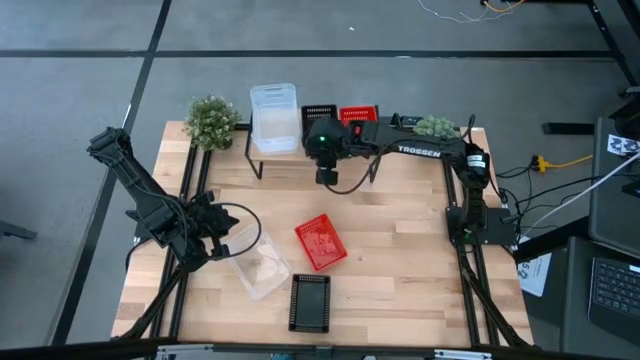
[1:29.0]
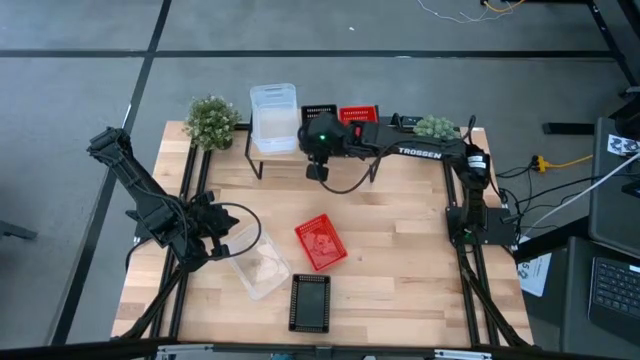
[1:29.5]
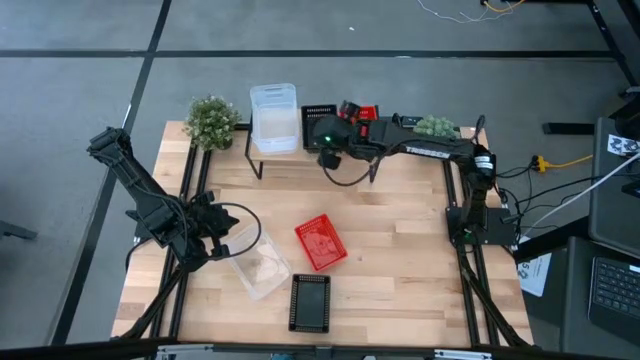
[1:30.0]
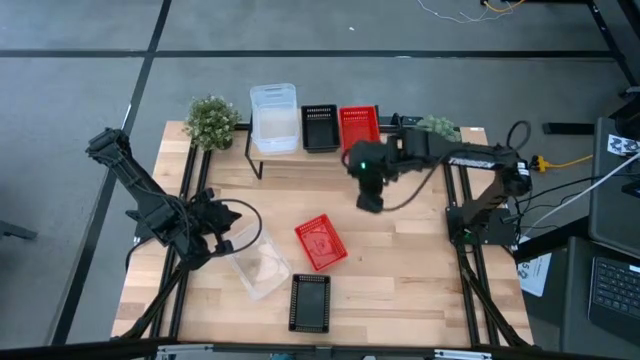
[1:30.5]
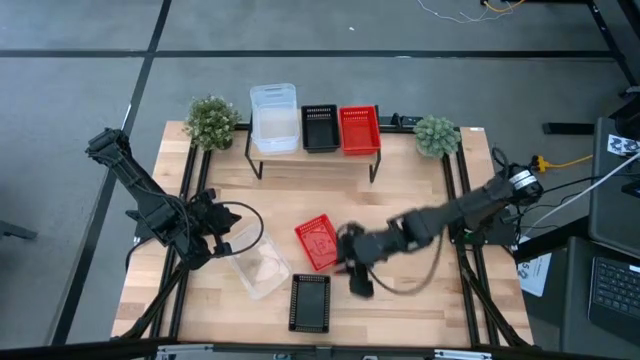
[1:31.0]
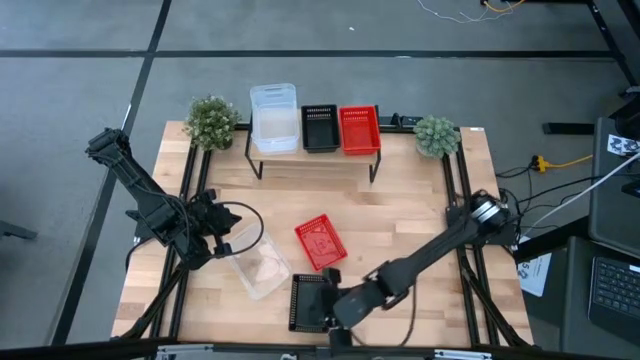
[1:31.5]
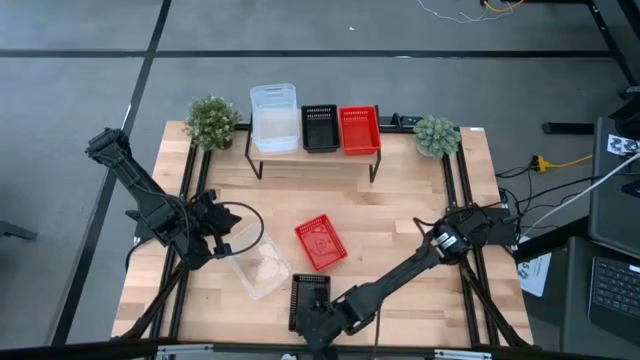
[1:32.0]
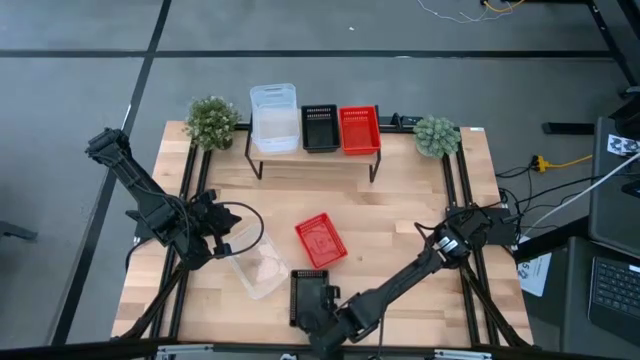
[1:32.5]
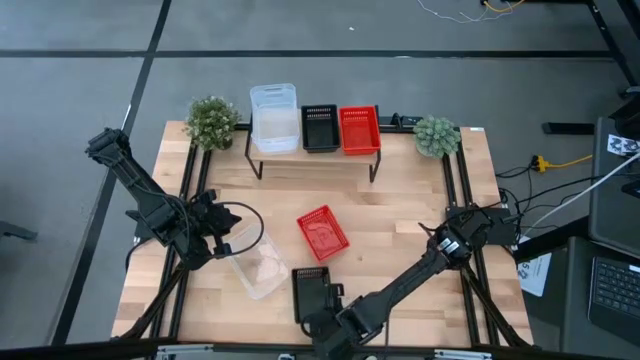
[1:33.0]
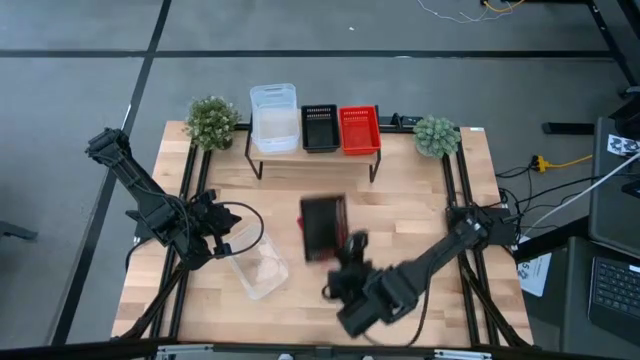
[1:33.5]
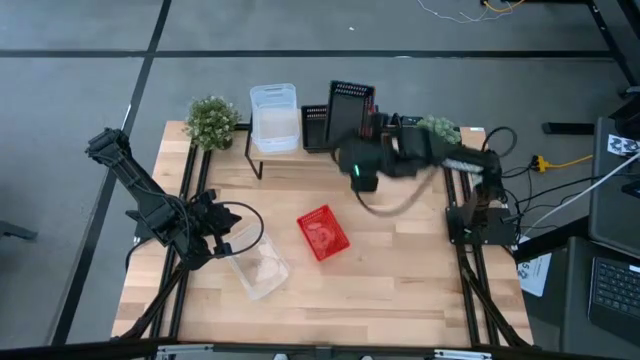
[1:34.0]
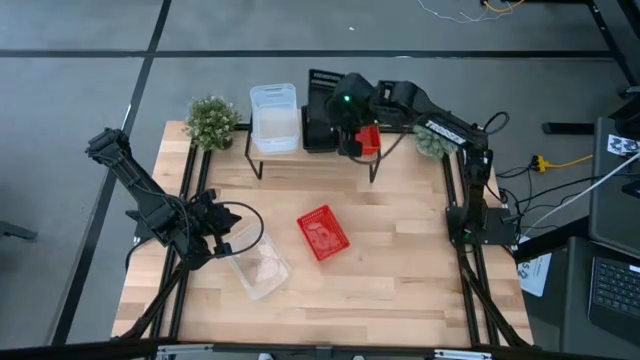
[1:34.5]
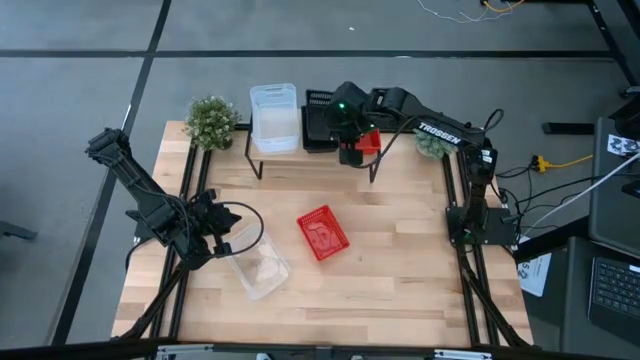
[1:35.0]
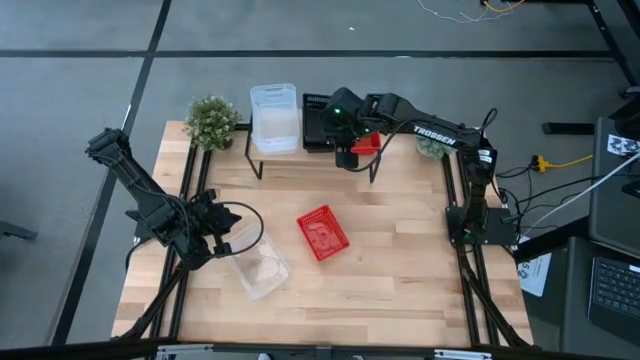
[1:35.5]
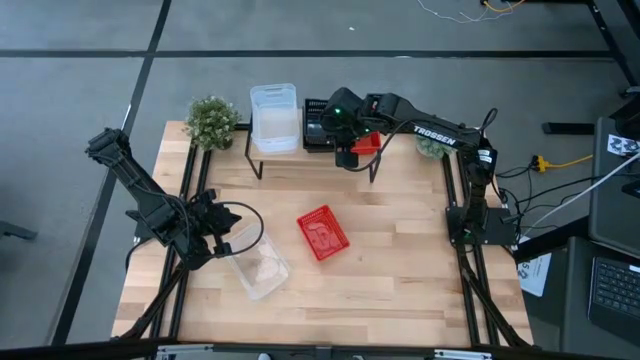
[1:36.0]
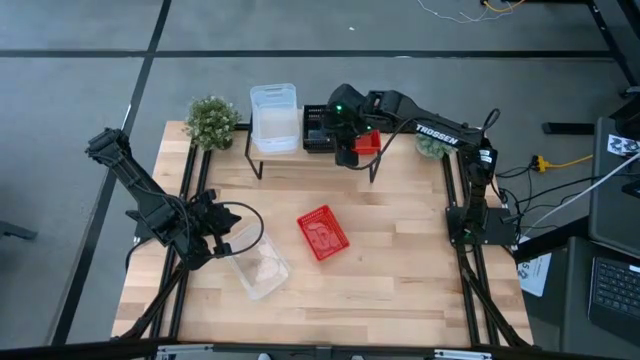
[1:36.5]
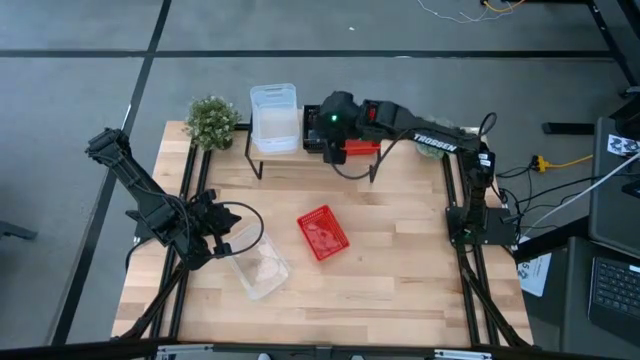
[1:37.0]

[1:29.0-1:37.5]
Task: Stack baskets on shelf by color
Stack the black bin on top of the black bins on the shelf

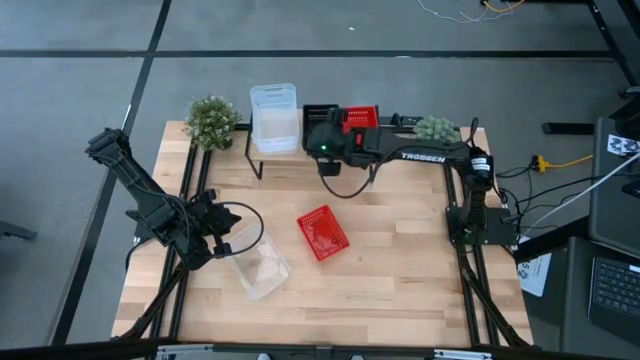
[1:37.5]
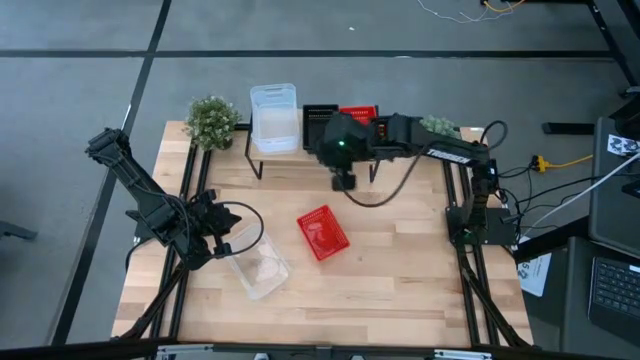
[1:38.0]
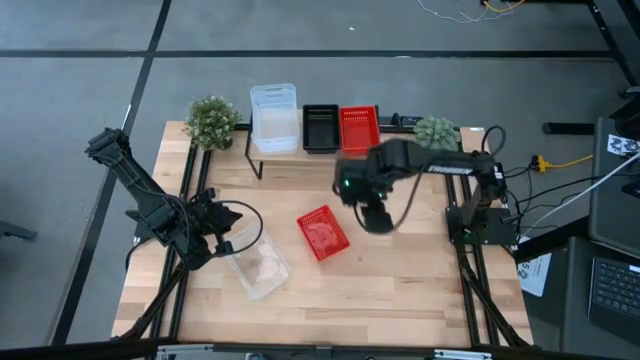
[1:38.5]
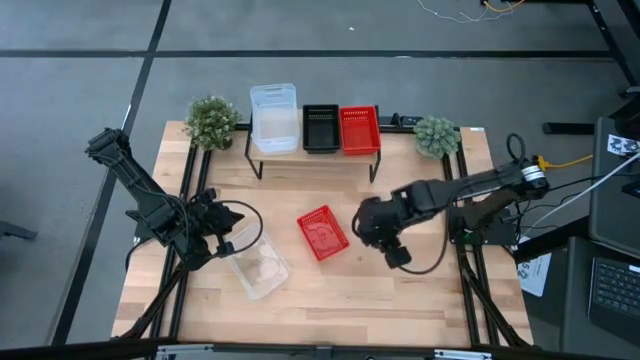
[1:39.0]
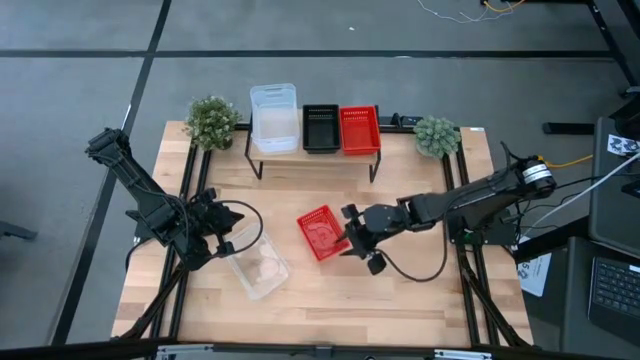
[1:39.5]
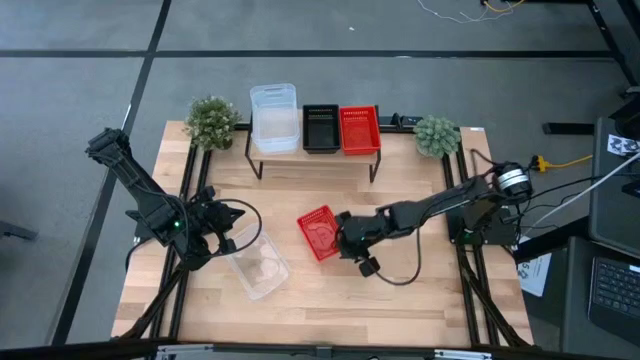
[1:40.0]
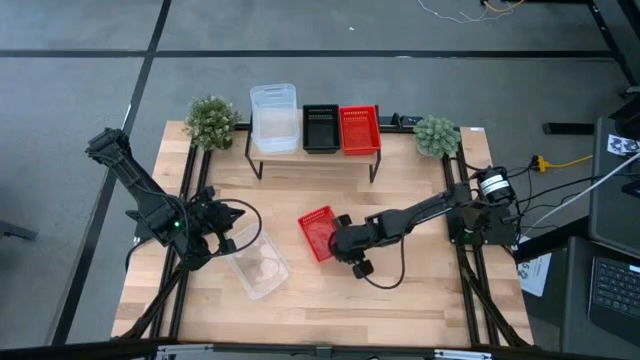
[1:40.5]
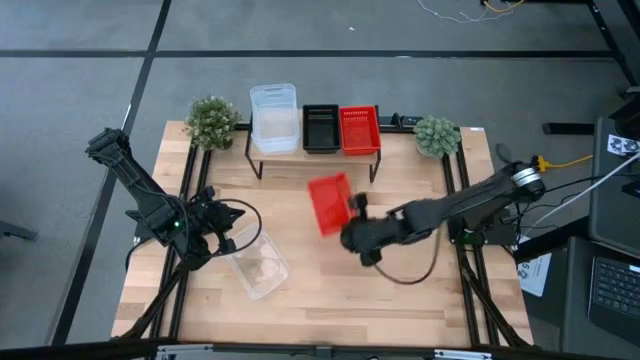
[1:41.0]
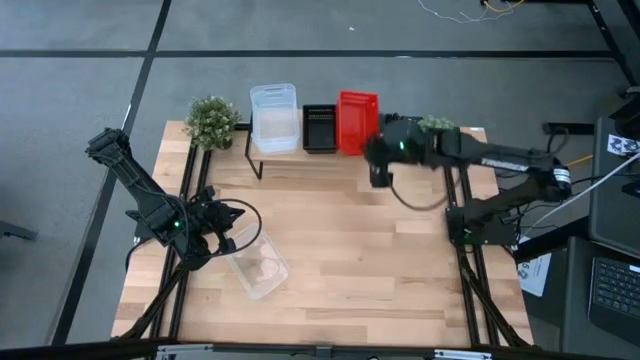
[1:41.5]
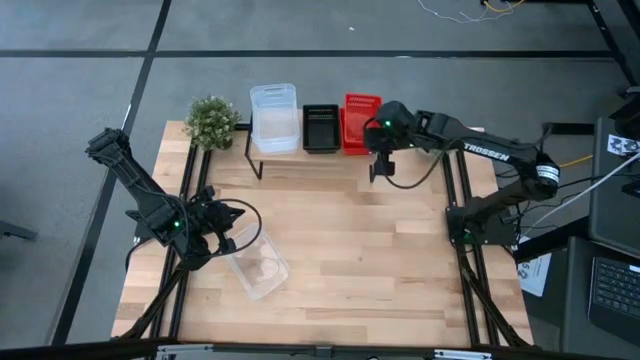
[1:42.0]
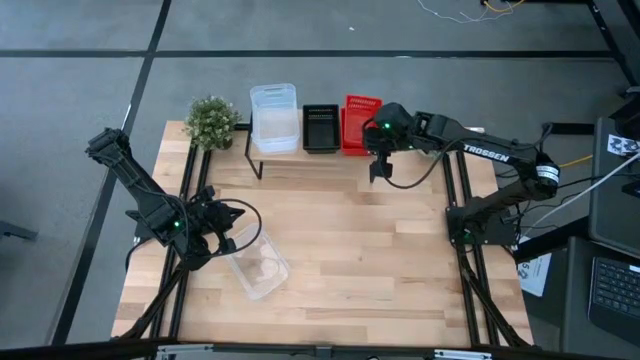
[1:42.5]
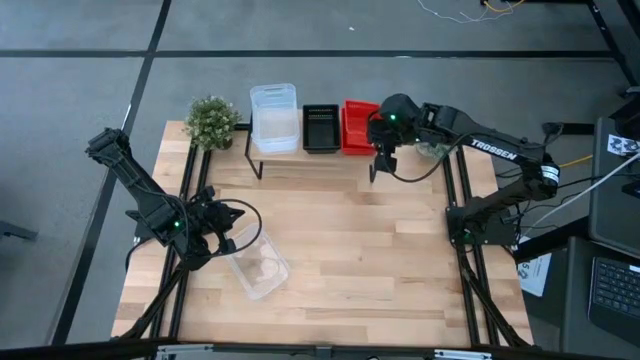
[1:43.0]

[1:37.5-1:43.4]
Stack the red bin on top of the red bins on the shelf

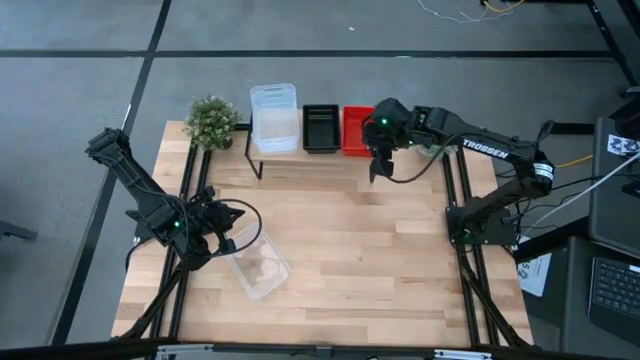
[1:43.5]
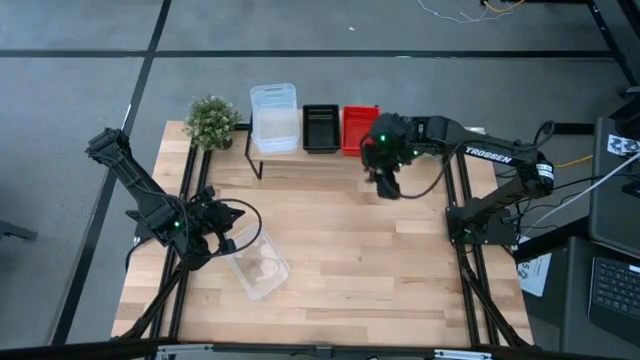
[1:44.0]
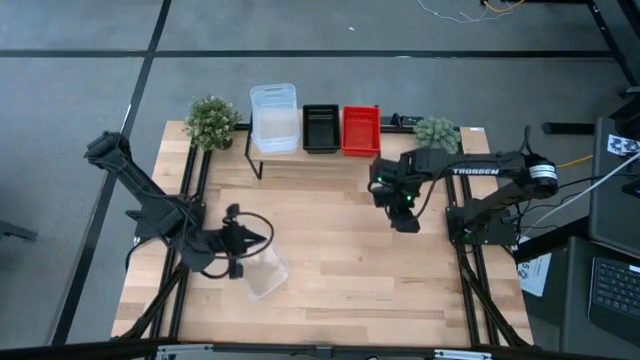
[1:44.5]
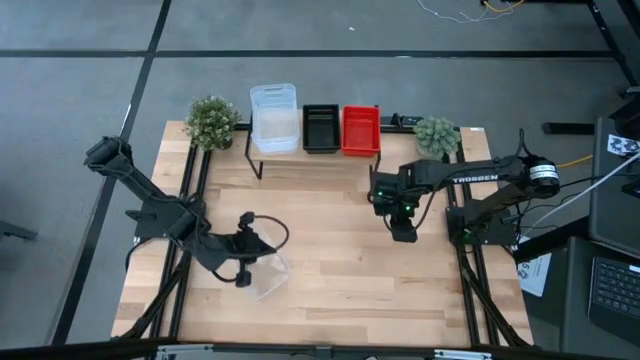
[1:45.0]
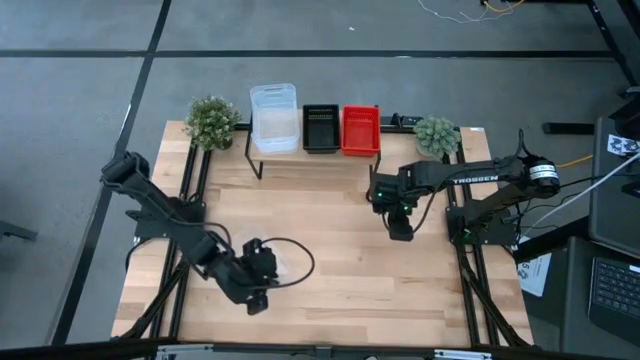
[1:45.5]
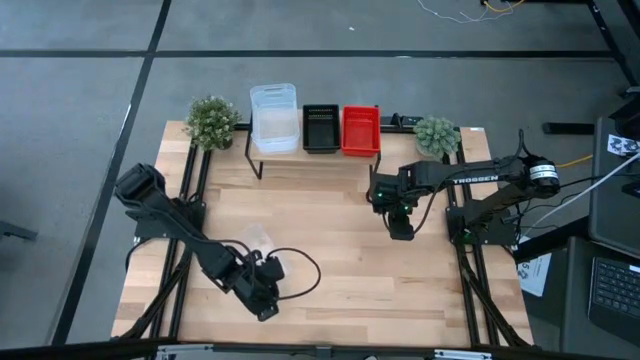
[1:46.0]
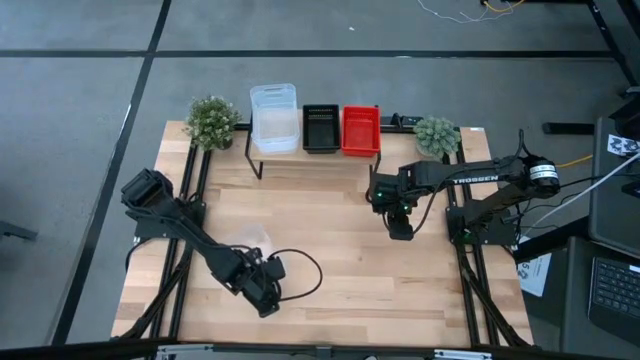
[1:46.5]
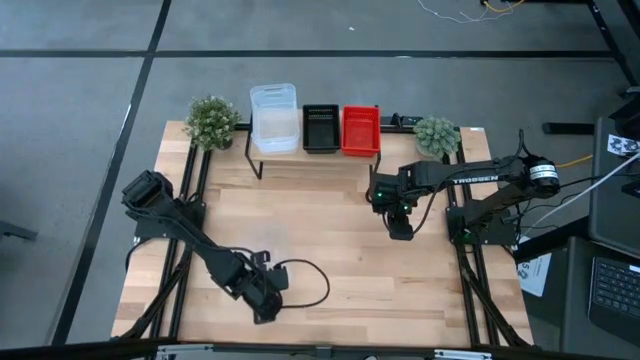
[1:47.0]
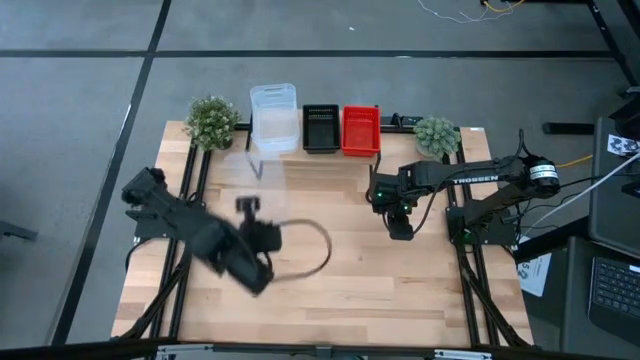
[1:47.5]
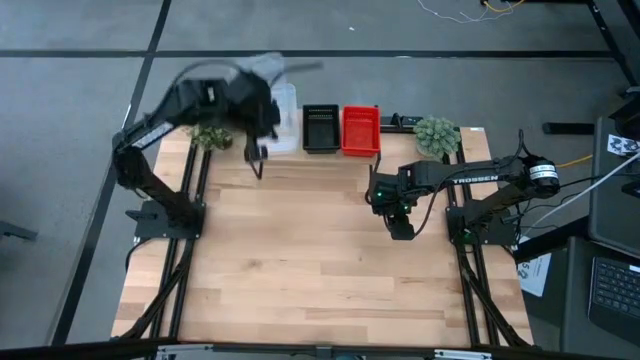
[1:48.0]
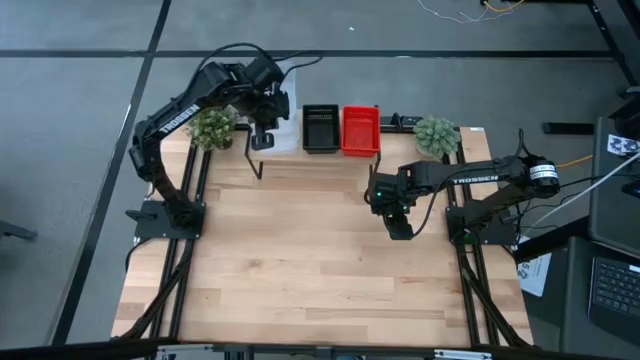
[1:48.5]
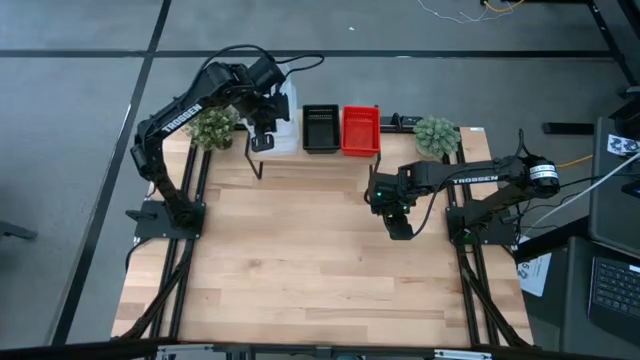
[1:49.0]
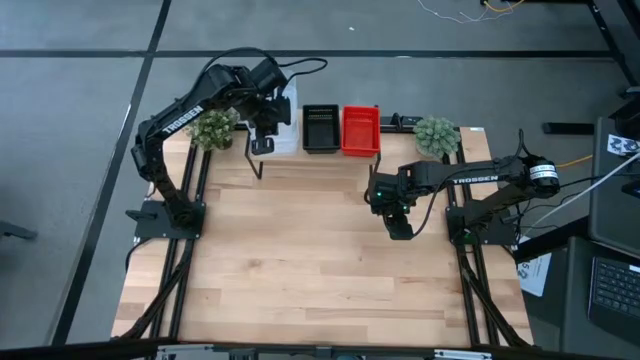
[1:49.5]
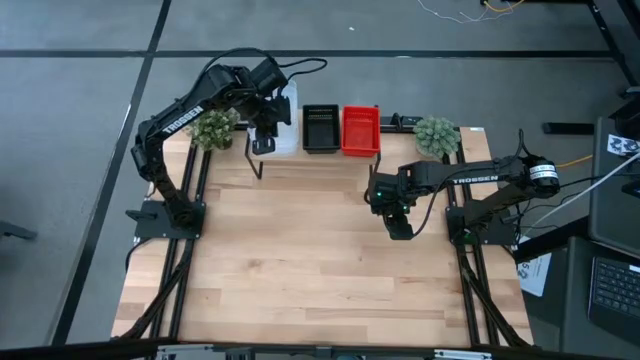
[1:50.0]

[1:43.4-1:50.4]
Stack the transparent bin on top of the transparent bins on the shelf
